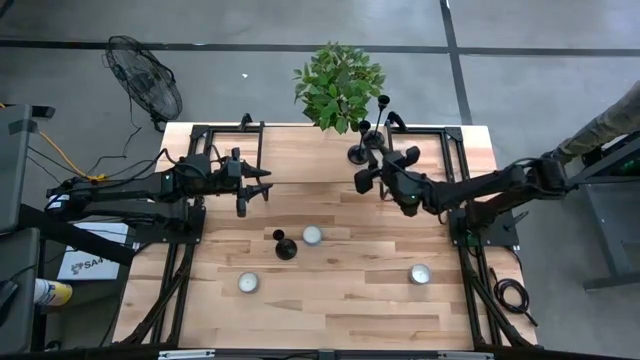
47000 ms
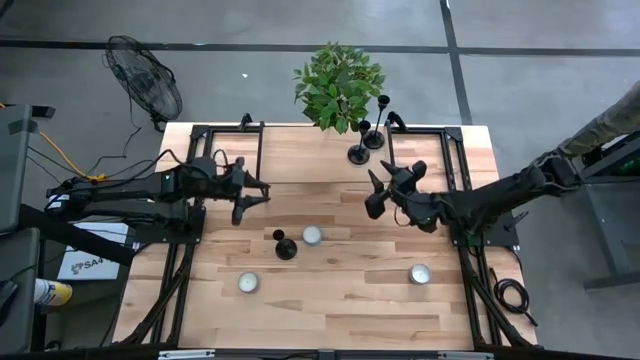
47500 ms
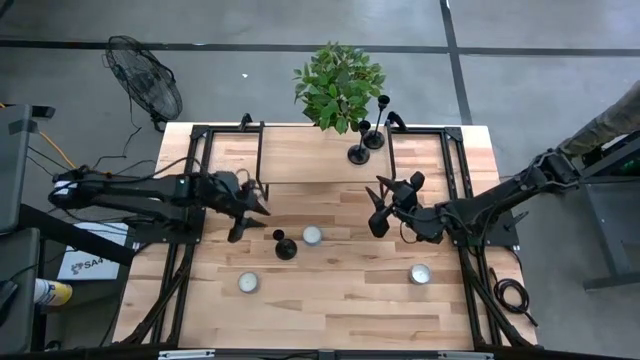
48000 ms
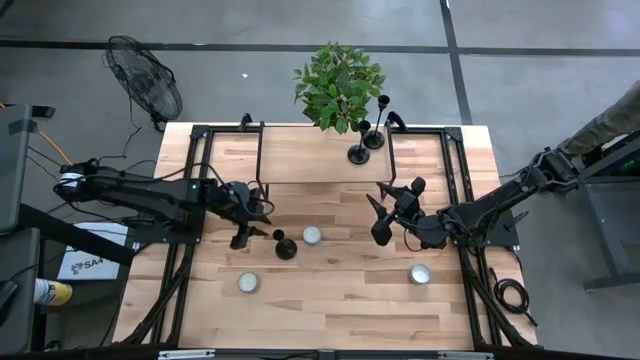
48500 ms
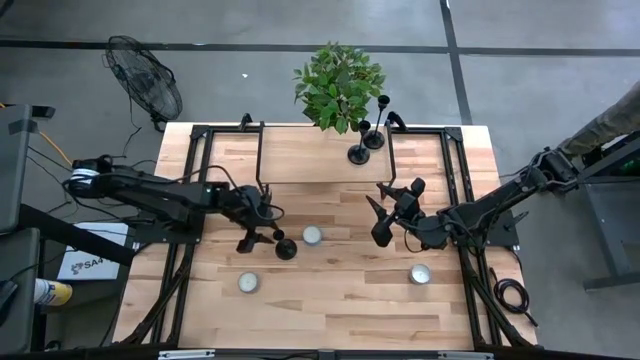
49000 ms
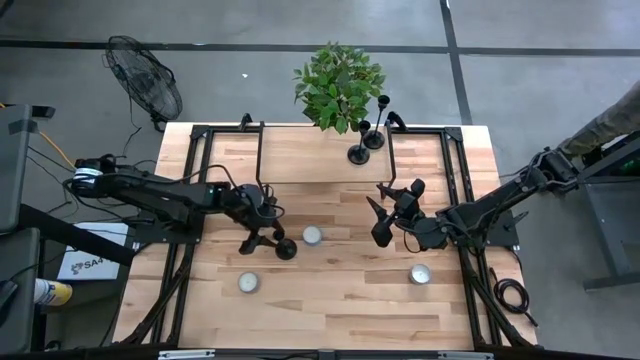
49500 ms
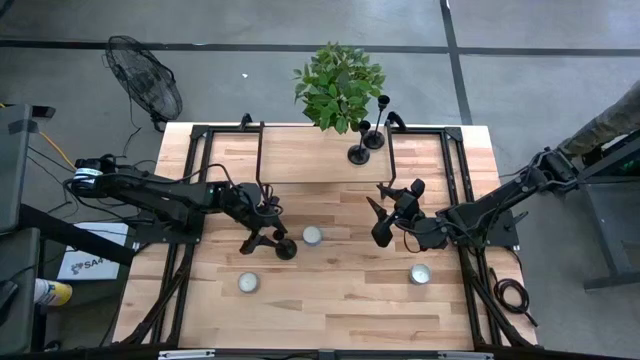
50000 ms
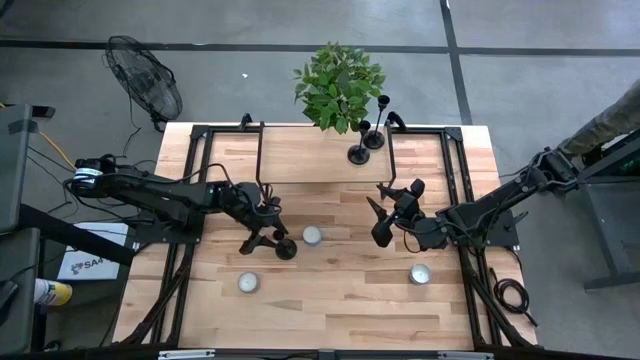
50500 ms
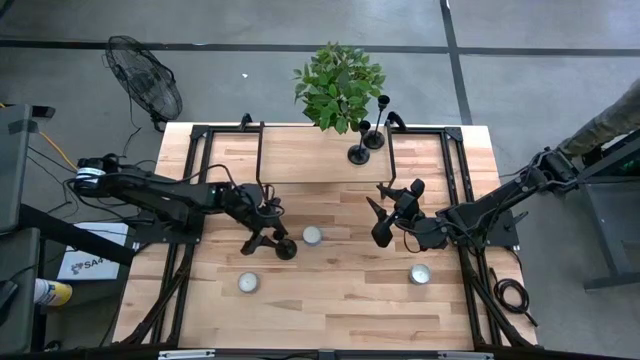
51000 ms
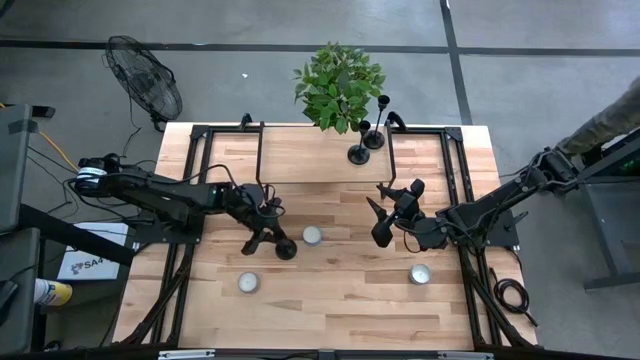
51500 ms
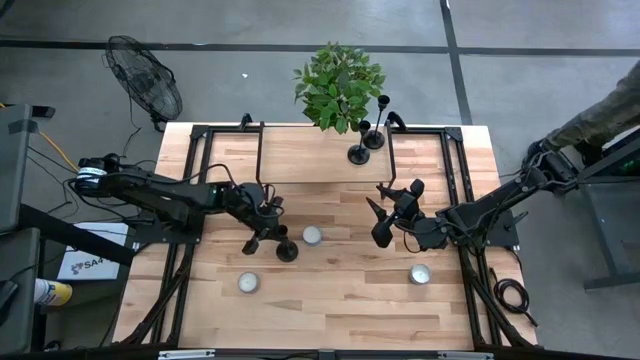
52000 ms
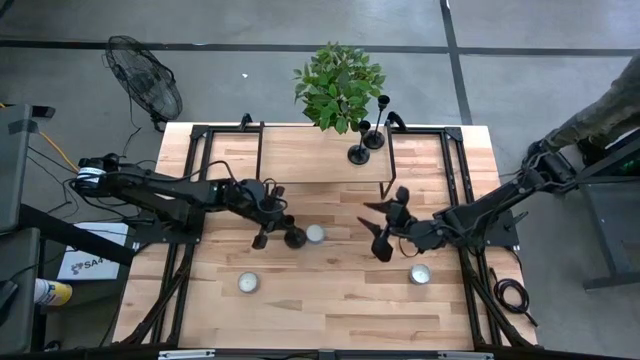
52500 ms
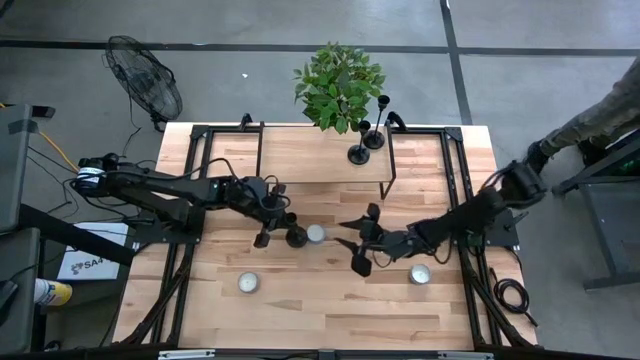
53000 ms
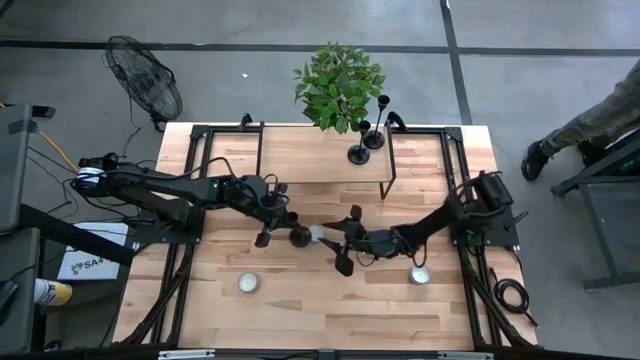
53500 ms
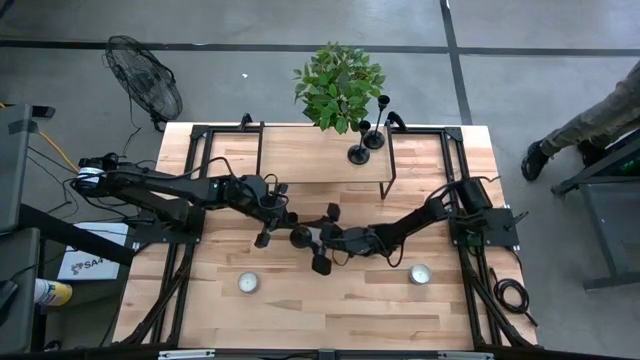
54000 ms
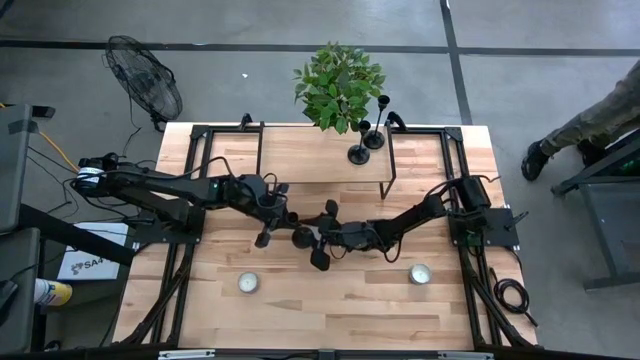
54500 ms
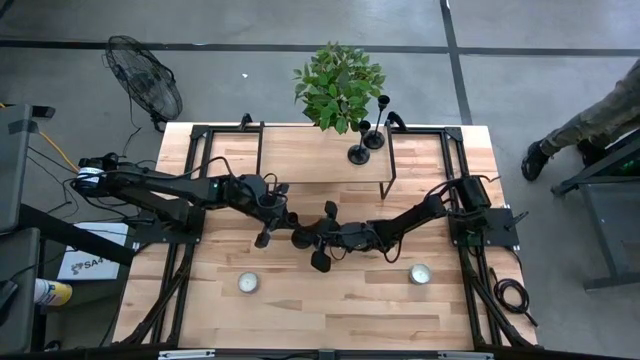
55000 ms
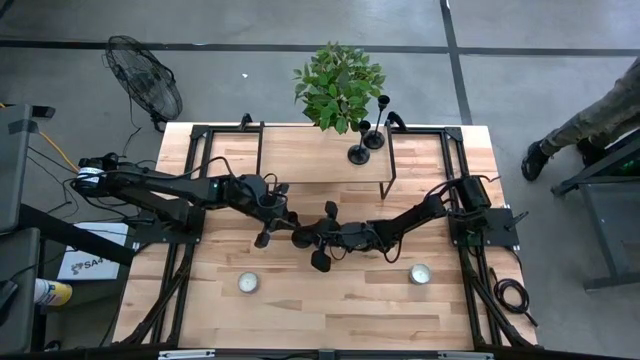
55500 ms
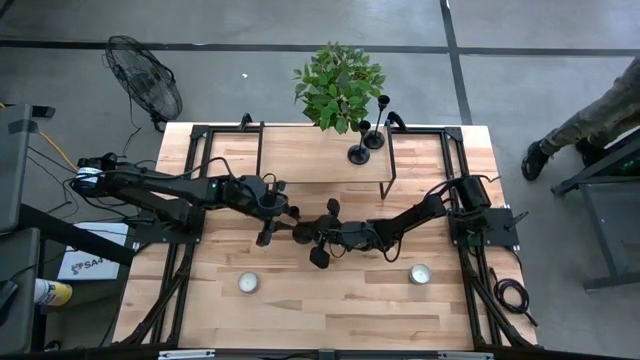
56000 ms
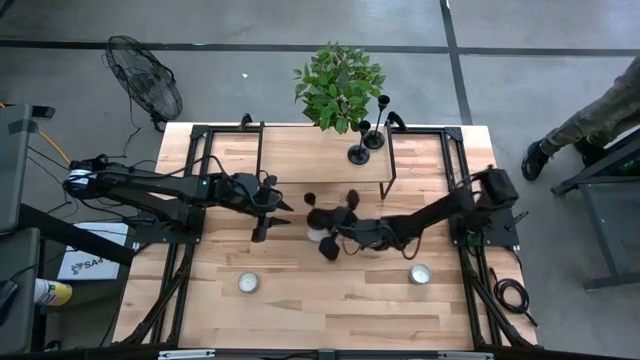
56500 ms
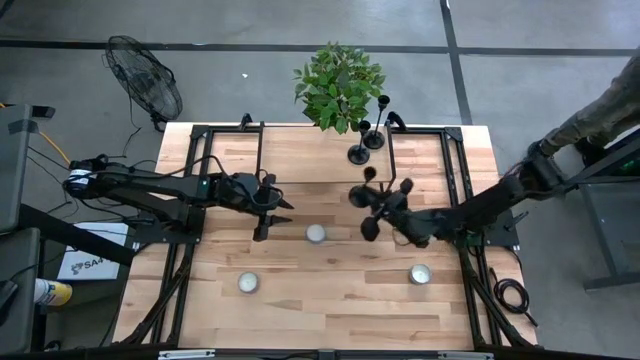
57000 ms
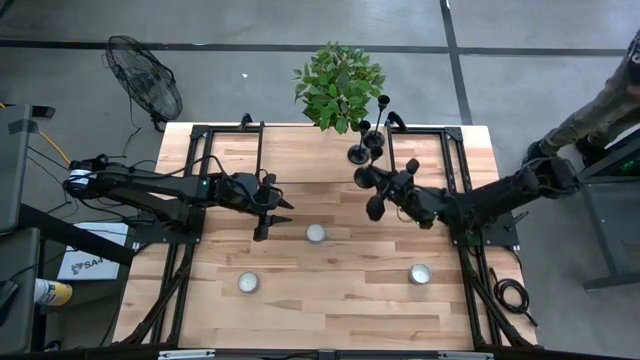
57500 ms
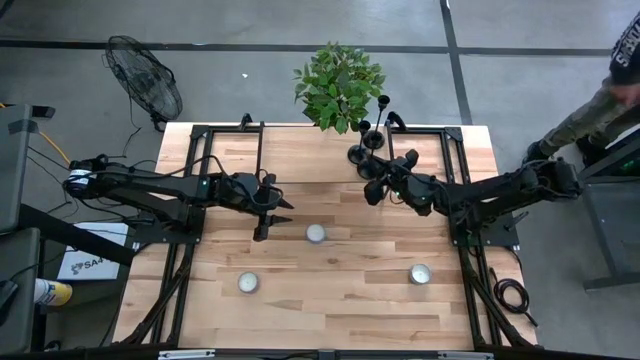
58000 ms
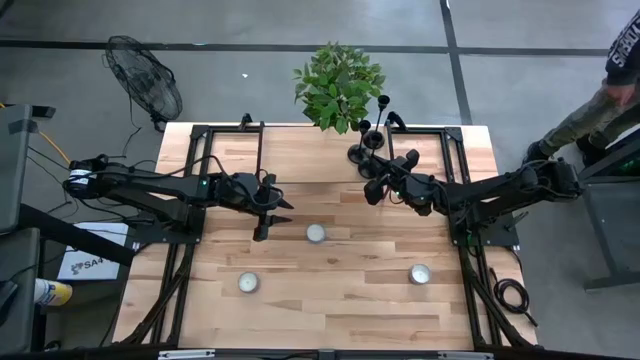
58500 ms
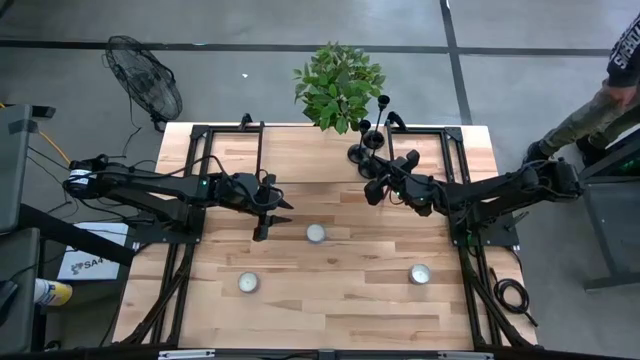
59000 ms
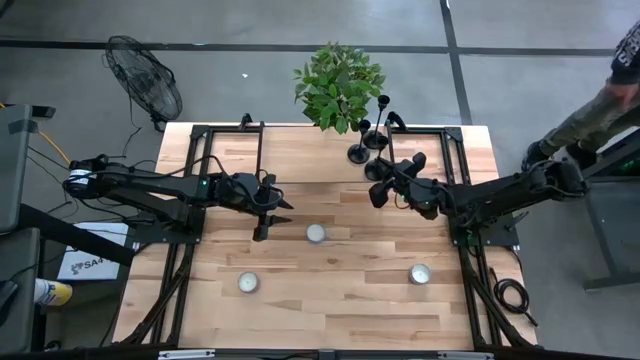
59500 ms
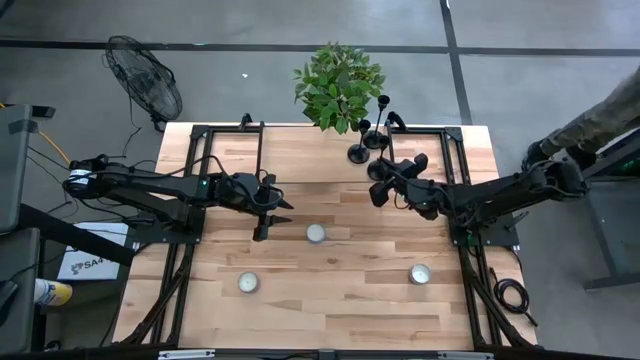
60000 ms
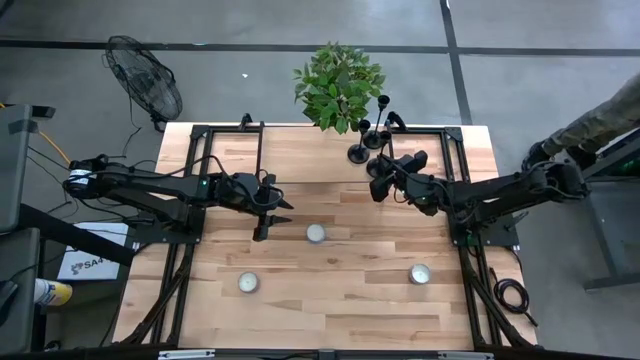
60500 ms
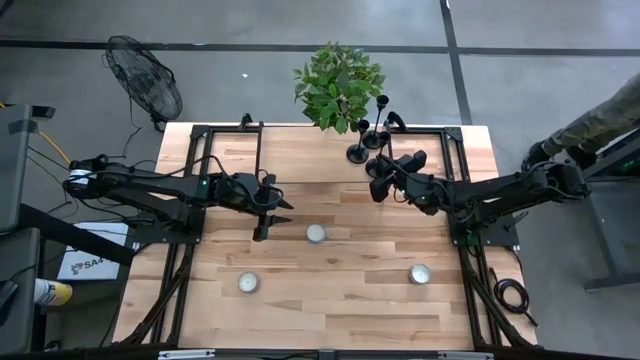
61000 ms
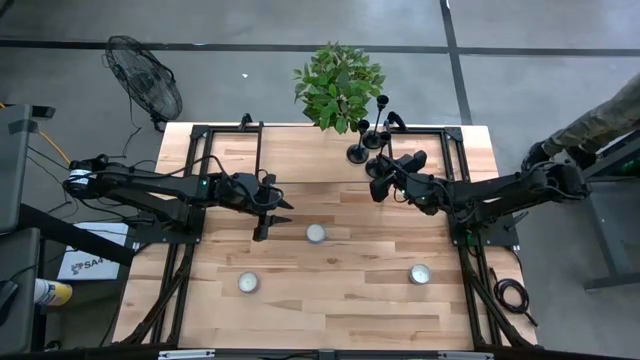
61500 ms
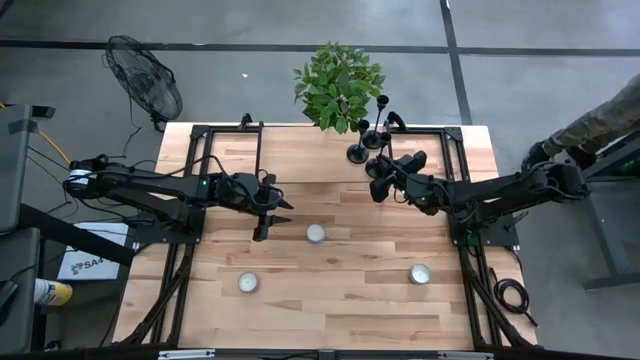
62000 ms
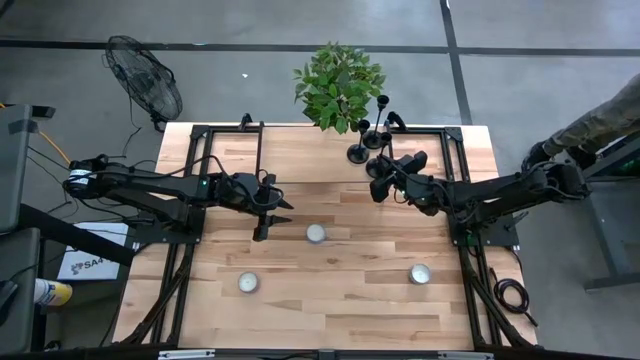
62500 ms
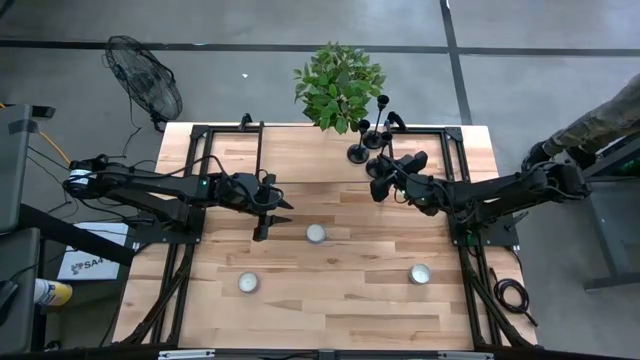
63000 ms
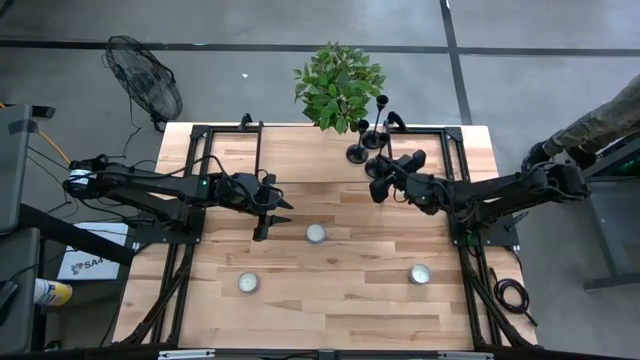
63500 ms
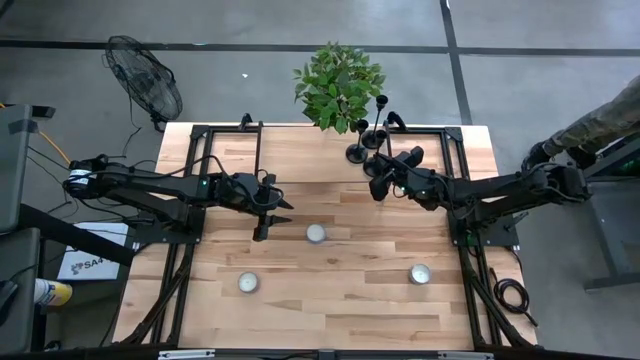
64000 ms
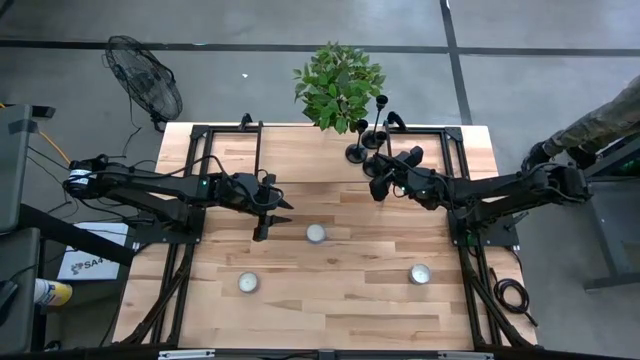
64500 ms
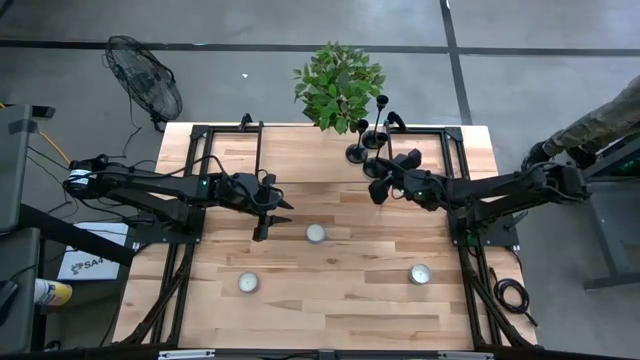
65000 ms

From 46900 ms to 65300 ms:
Task: Pick & Place candle stick holders
Put the black candle holder on the shelf

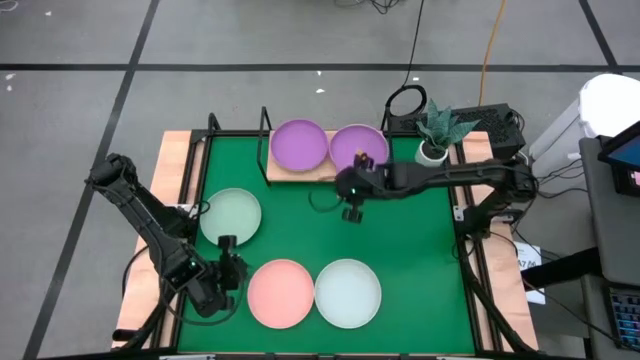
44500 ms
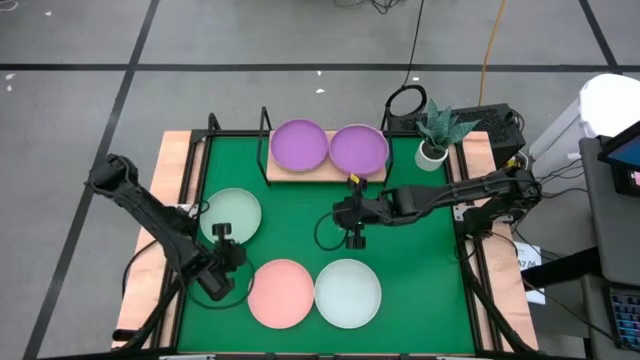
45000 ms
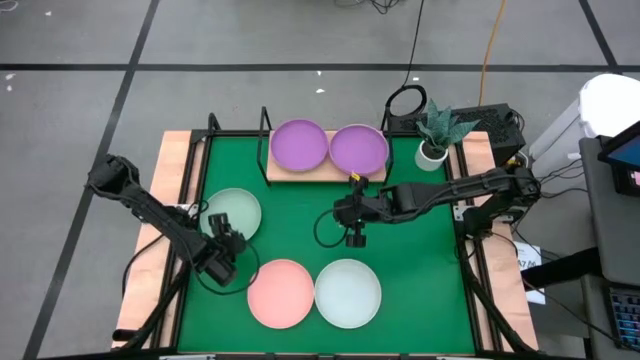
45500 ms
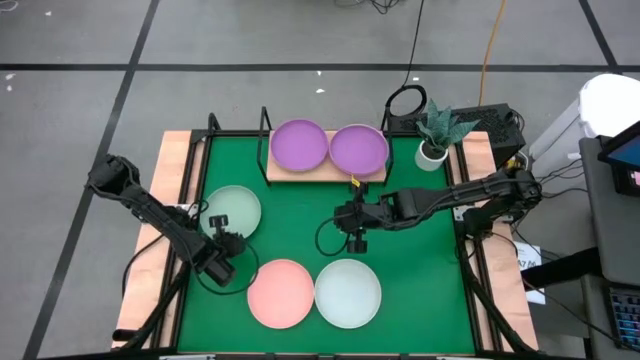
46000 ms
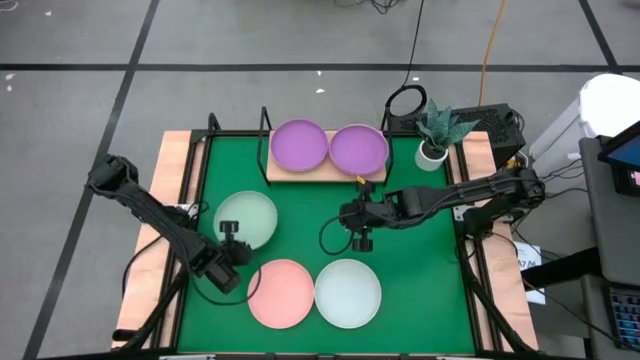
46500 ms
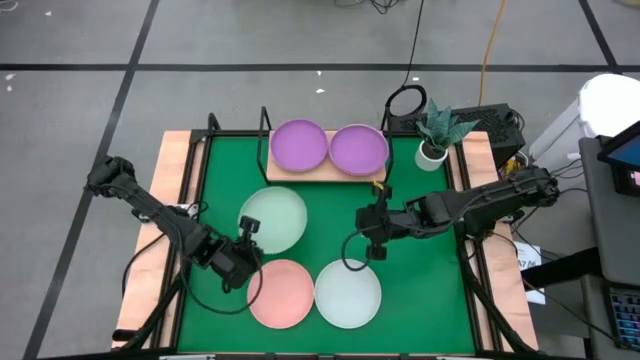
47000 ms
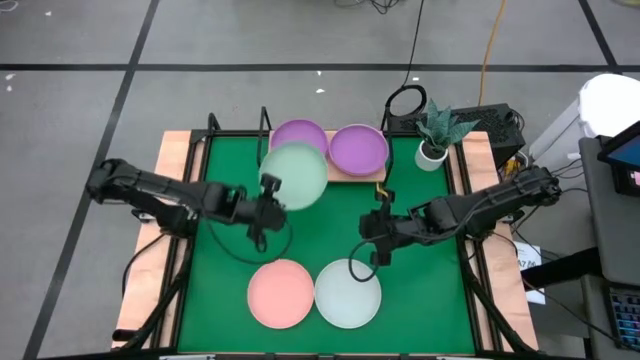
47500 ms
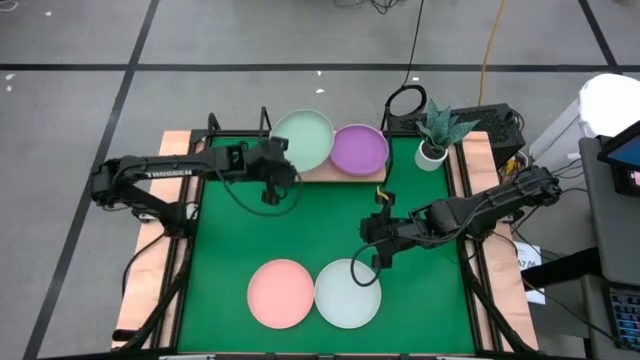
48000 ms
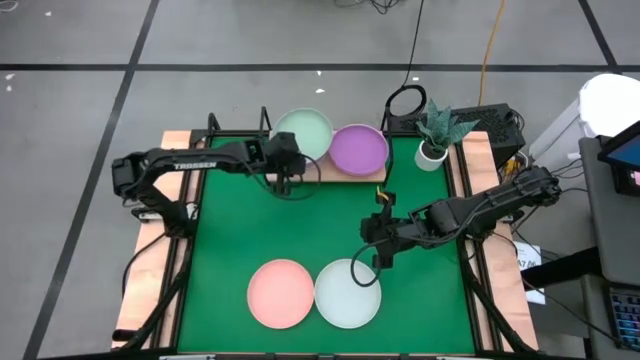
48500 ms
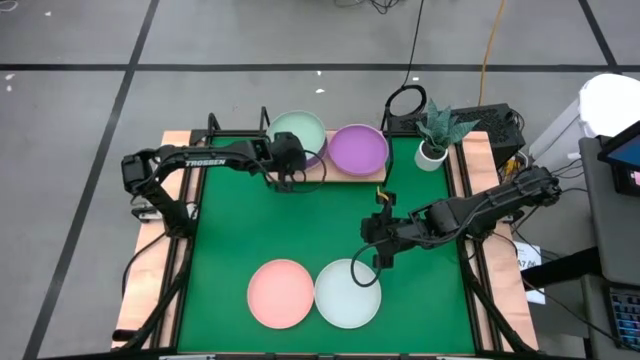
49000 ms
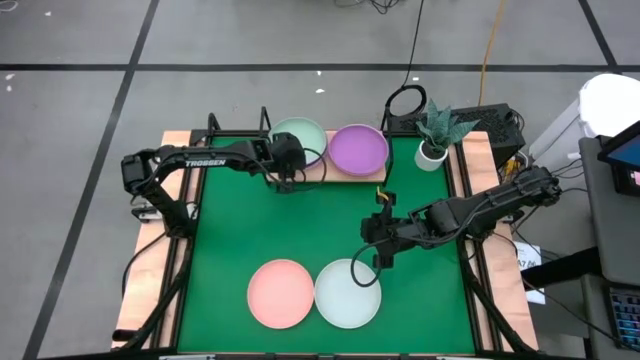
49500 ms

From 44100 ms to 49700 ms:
Task: Place and stack plates onto a shelf
Stack the light green plate on top of the purple plate on the shelf
